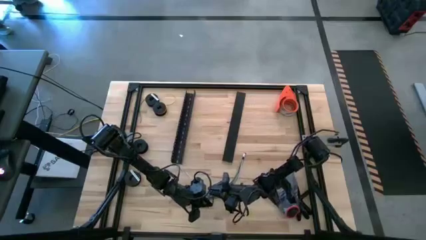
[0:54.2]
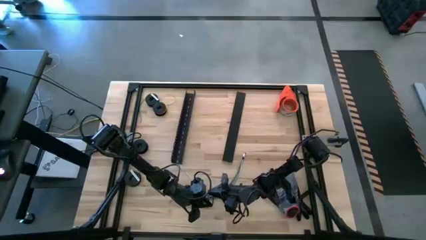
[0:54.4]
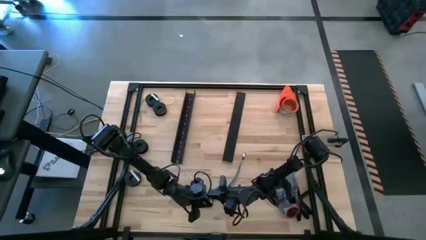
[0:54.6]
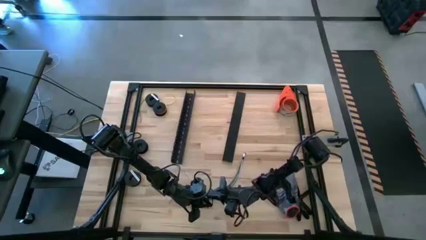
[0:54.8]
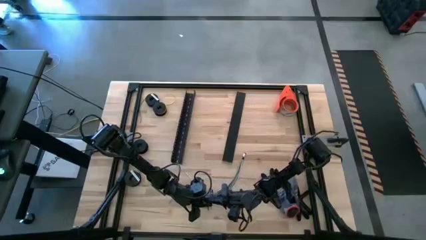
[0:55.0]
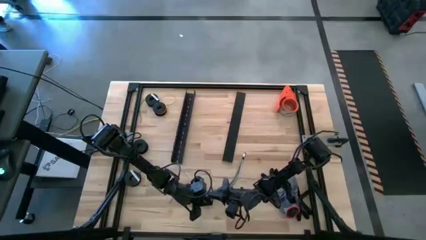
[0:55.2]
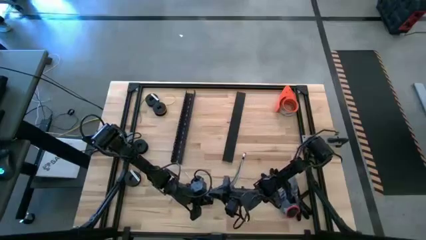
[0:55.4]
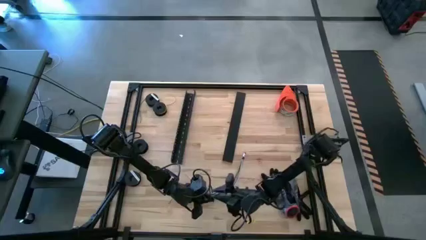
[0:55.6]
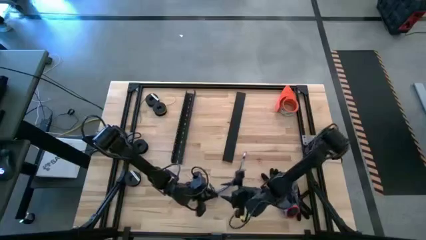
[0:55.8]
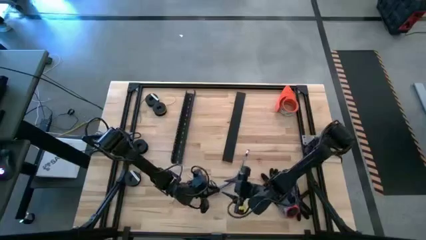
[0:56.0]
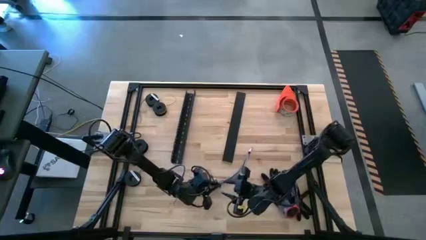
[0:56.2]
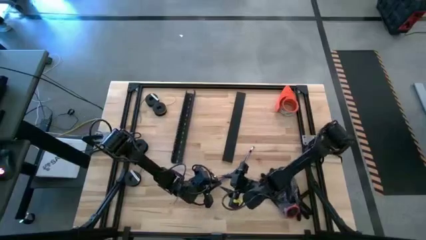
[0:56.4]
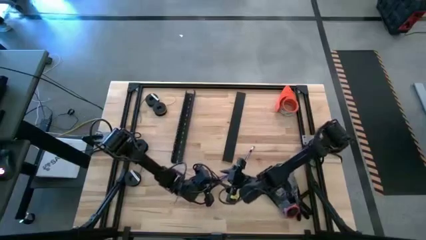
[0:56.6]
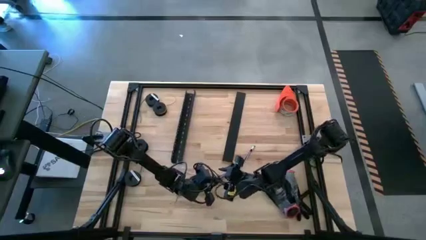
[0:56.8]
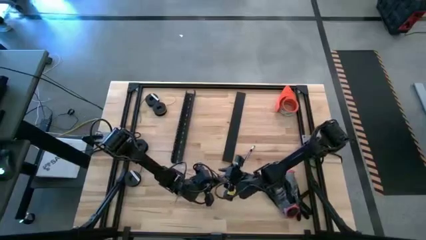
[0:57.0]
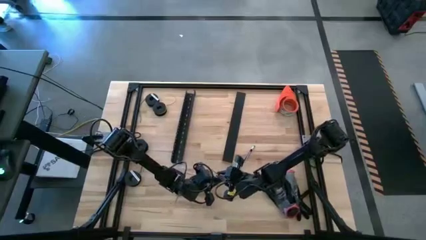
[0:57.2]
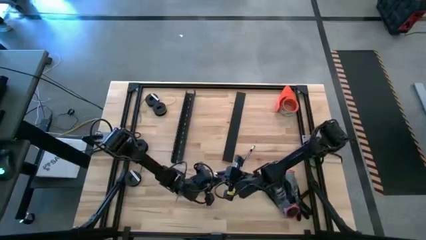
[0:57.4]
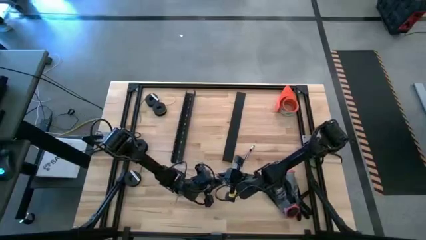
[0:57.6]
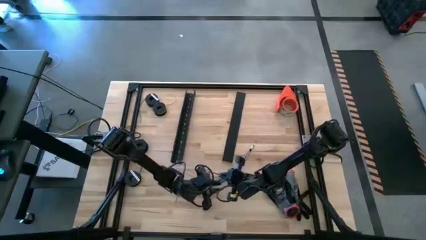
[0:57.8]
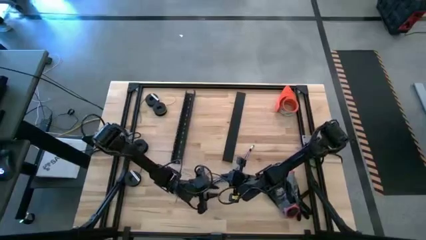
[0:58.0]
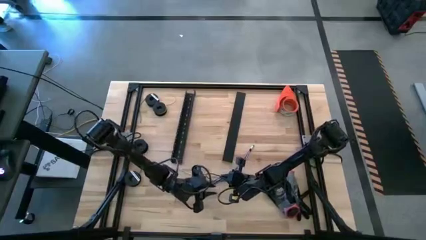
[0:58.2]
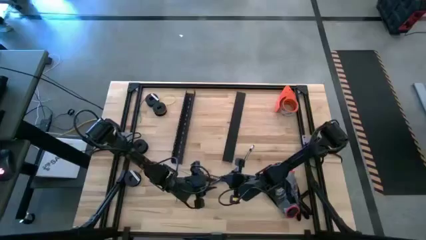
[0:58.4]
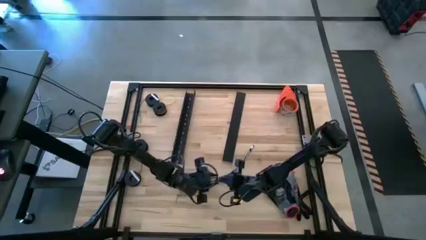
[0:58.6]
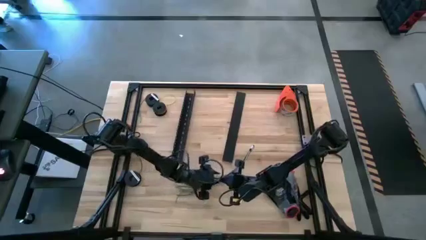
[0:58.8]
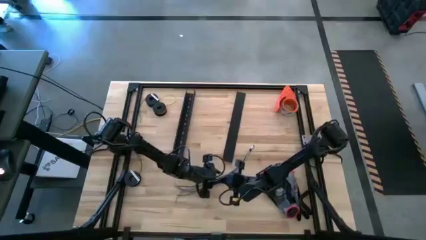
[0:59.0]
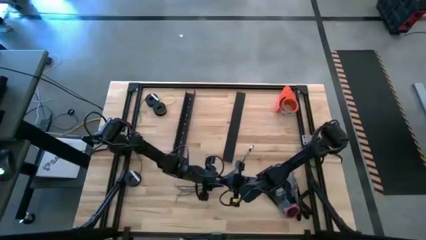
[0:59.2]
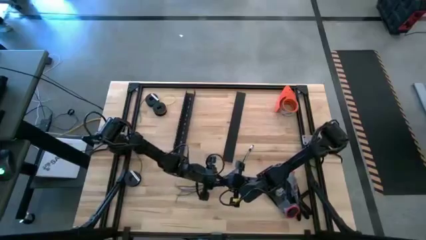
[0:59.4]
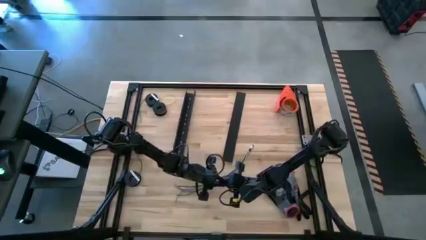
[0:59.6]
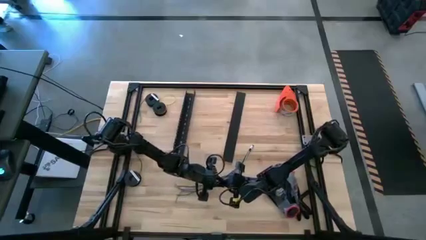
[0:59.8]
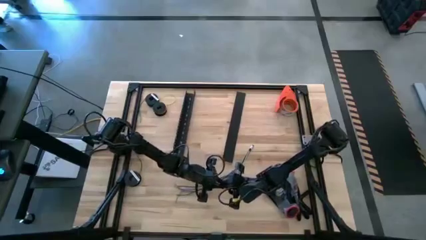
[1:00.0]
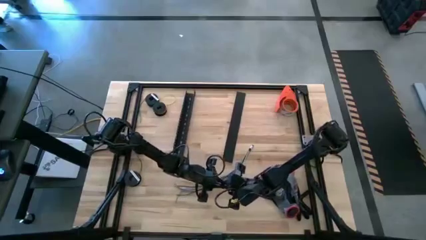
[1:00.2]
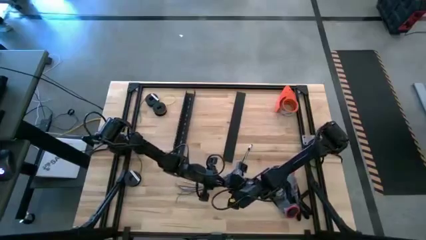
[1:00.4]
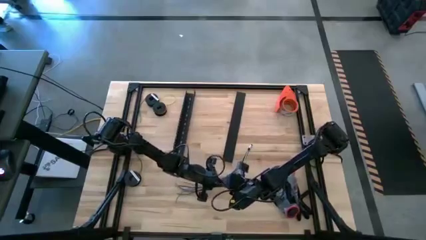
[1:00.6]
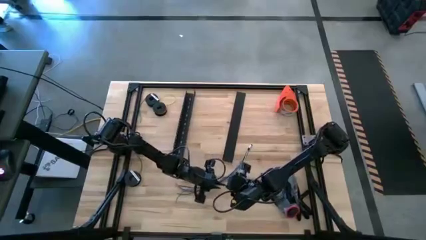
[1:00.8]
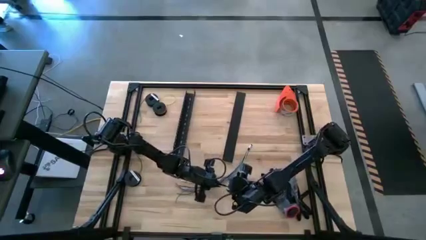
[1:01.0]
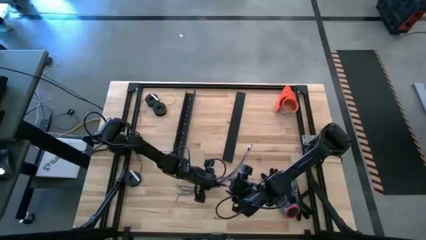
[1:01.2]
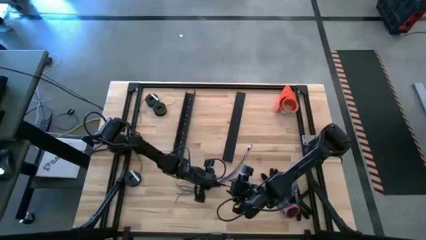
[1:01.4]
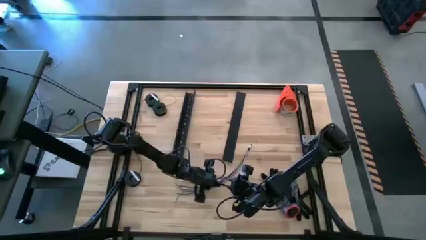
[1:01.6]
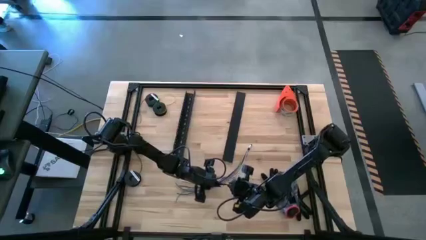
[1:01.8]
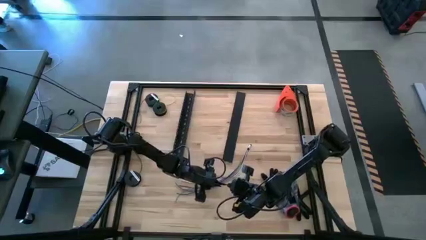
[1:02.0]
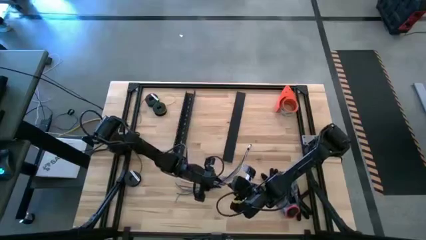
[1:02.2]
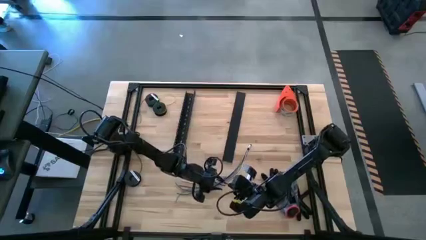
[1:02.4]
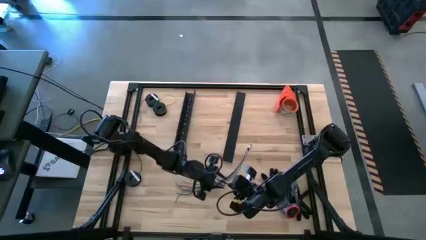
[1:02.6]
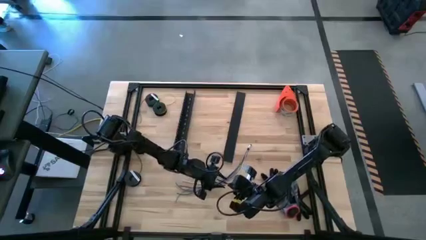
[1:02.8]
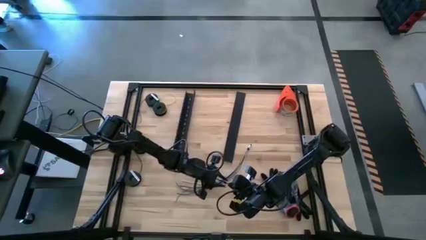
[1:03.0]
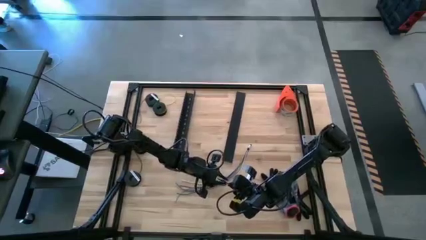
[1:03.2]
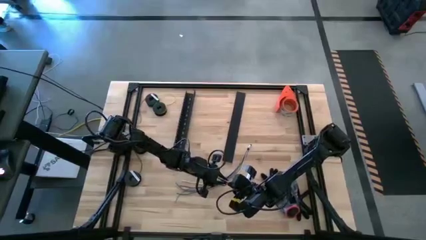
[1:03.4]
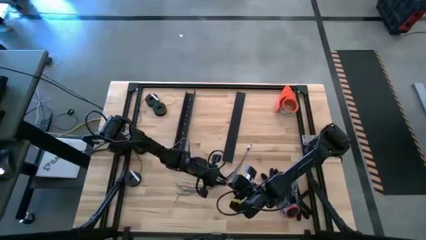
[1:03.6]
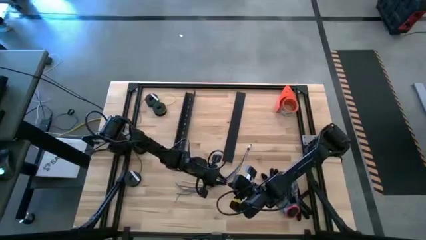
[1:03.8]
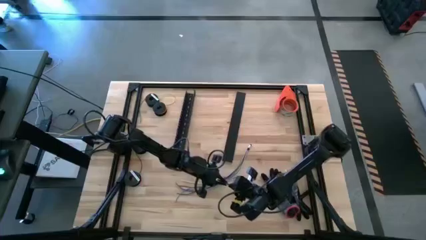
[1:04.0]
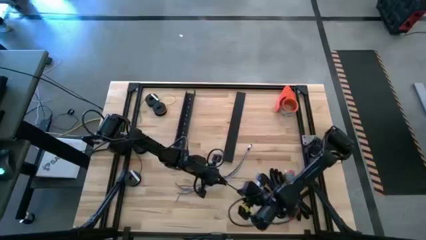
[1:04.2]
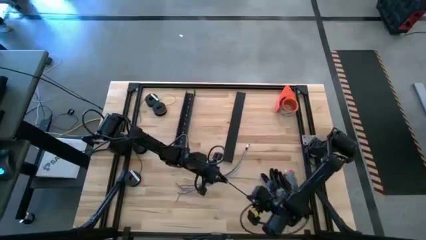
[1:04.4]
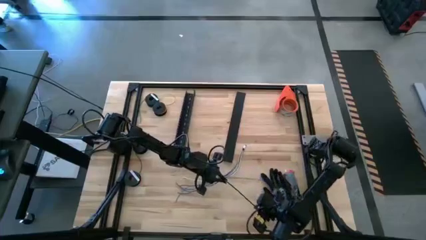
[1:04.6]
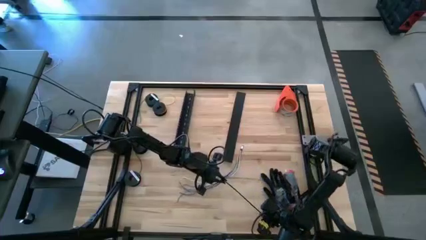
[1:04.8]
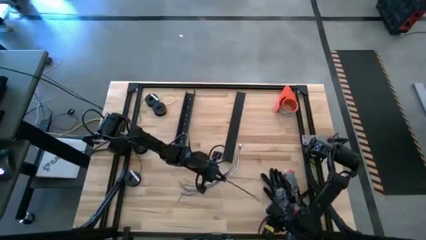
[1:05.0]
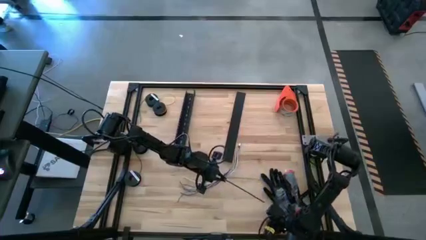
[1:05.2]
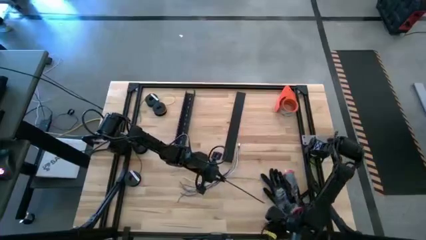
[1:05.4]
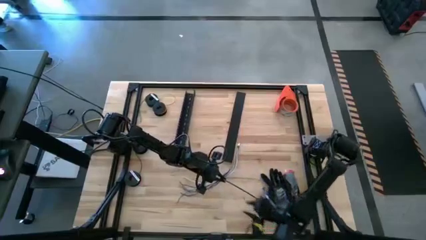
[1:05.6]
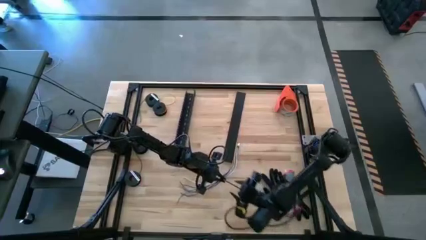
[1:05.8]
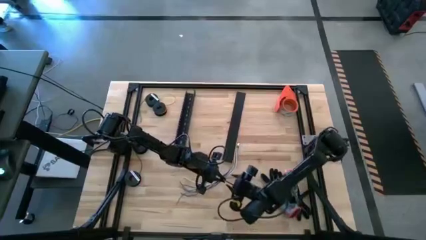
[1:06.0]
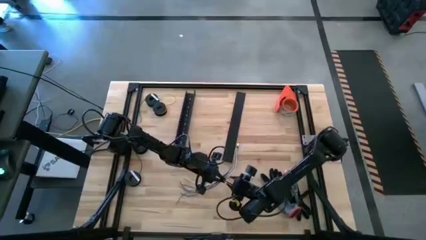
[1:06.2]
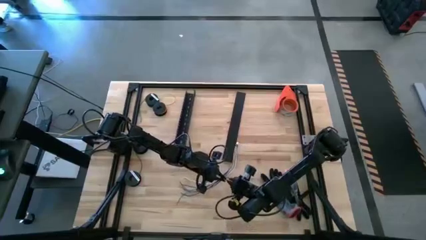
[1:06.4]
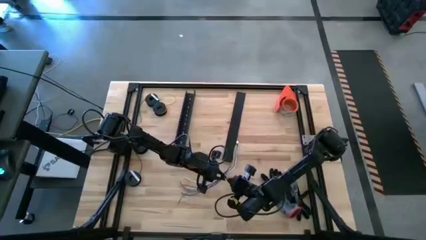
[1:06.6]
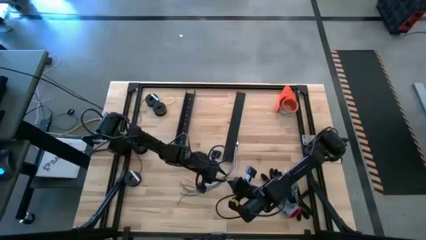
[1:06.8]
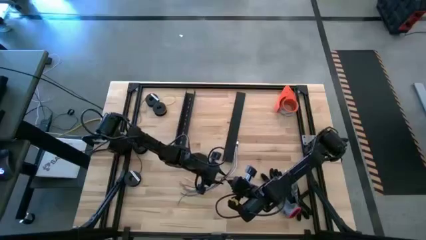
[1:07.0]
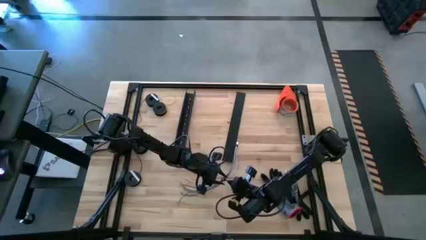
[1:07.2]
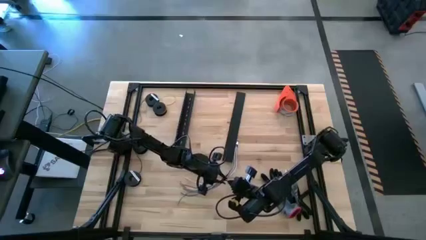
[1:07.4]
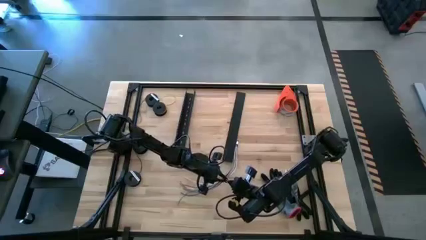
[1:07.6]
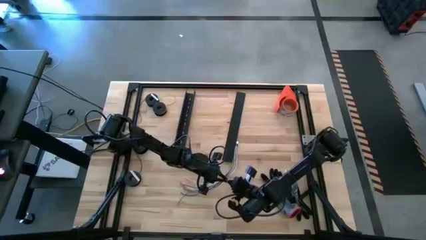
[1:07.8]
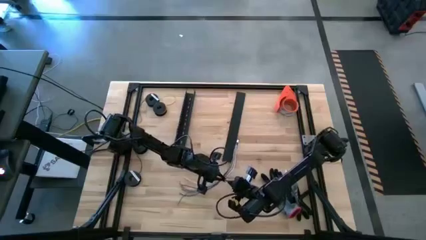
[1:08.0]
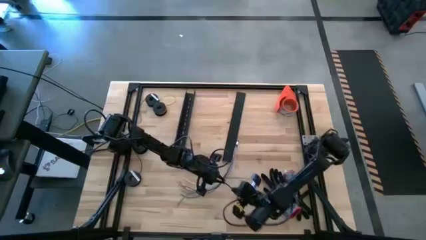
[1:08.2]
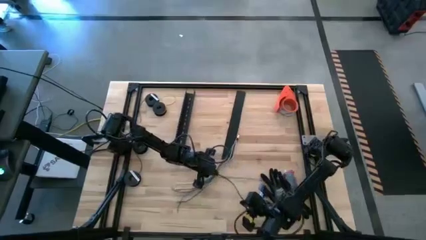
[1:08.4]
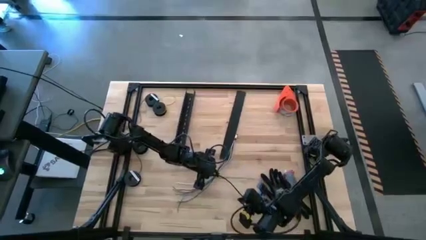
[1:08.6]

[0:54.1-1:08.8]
Task: Ziptie cables
Wrap the cable wires using zip tie
